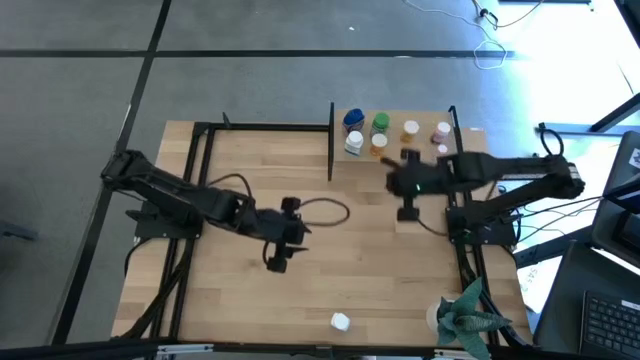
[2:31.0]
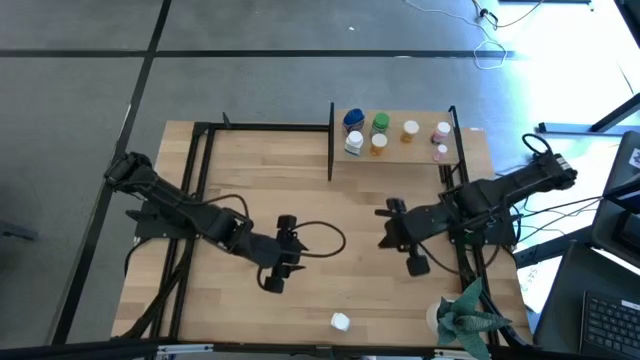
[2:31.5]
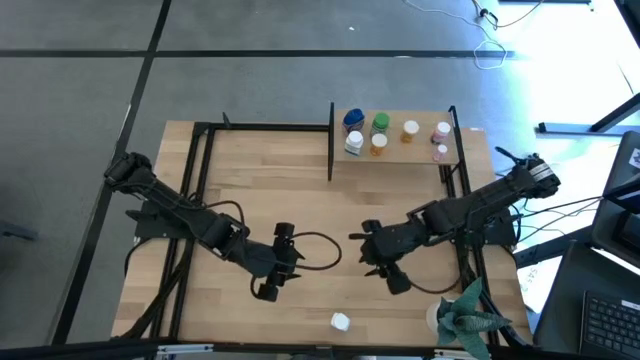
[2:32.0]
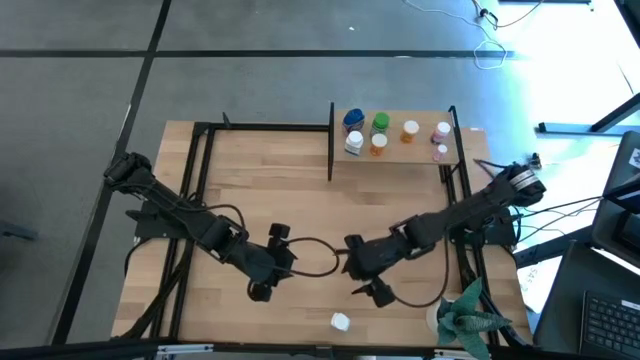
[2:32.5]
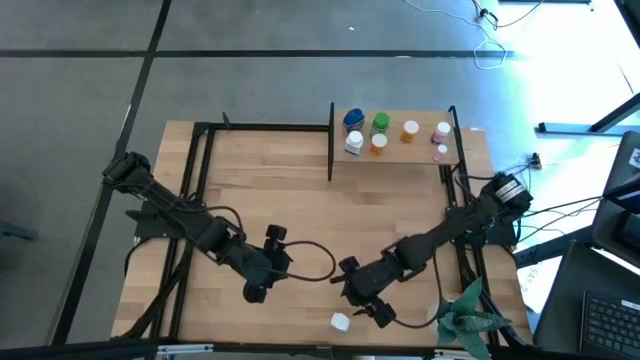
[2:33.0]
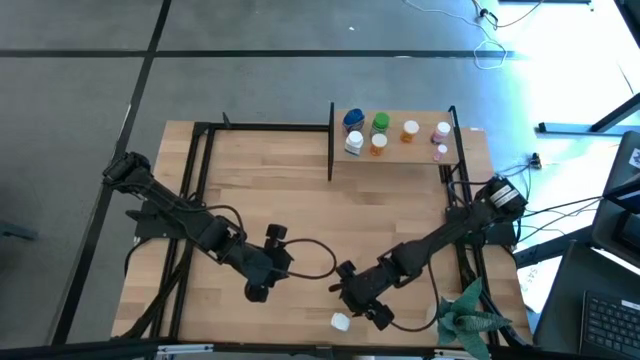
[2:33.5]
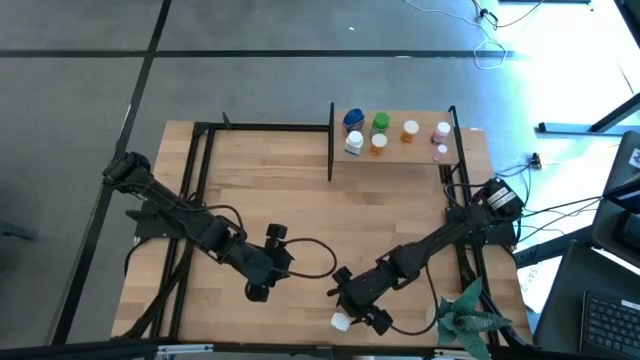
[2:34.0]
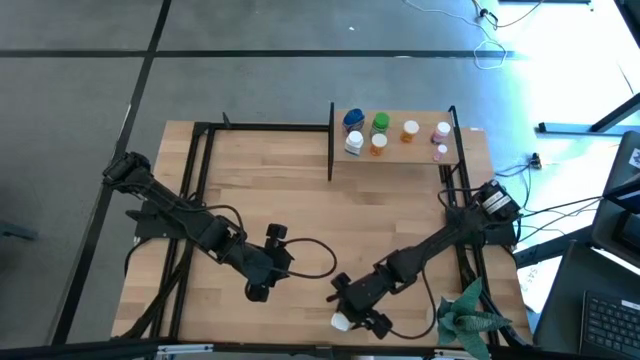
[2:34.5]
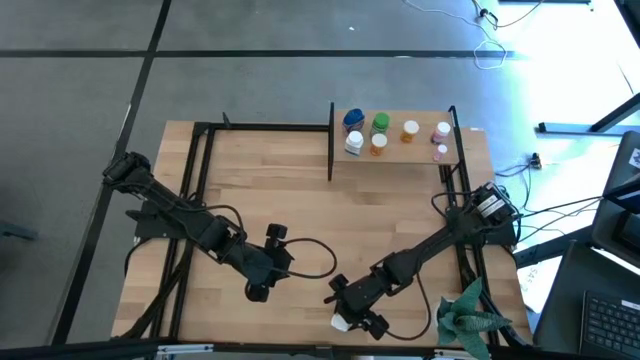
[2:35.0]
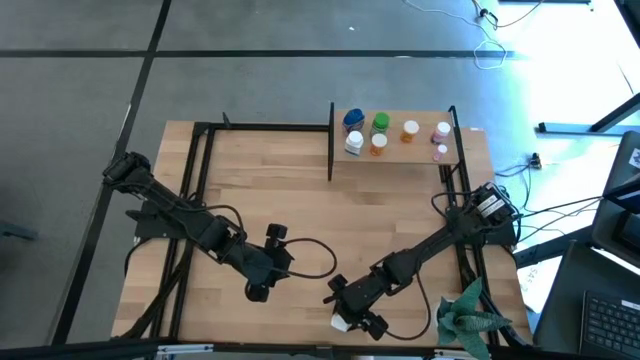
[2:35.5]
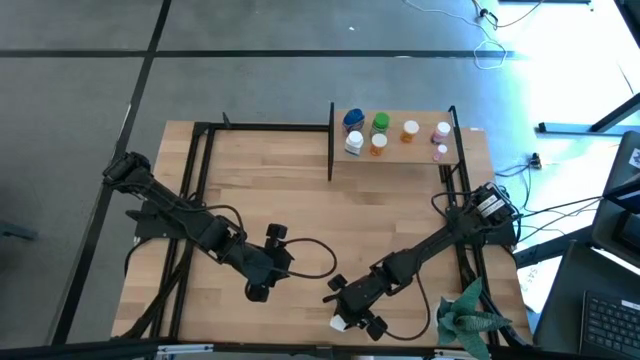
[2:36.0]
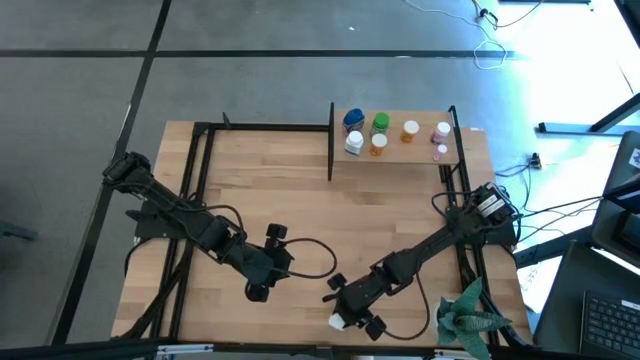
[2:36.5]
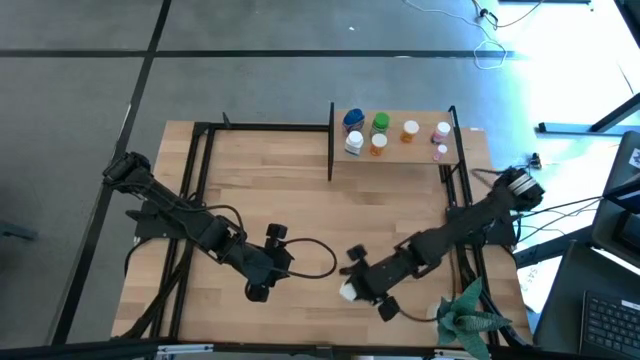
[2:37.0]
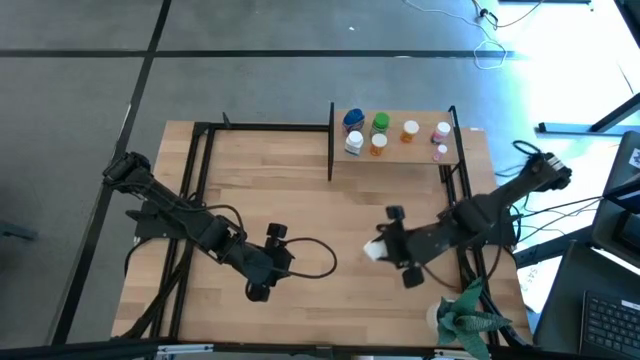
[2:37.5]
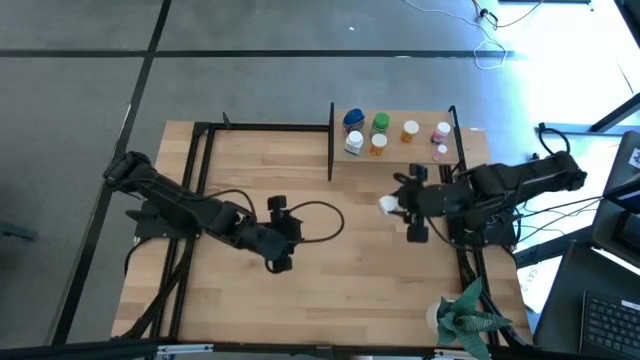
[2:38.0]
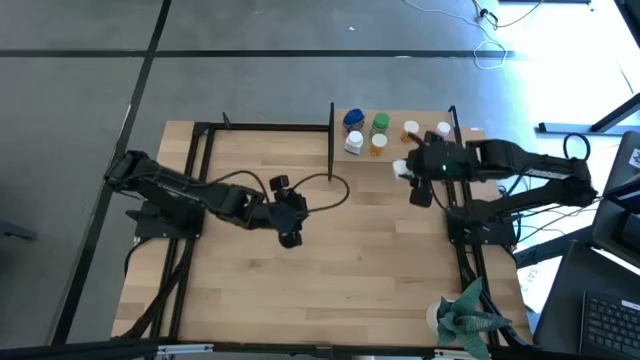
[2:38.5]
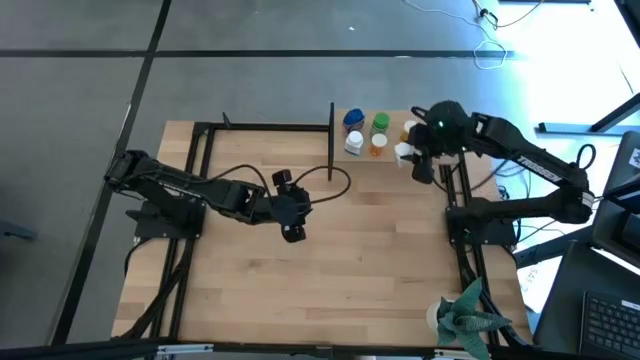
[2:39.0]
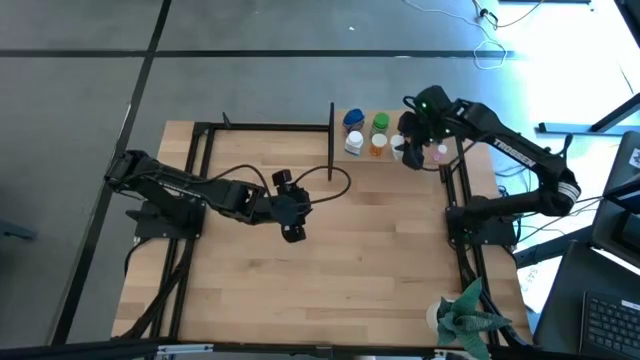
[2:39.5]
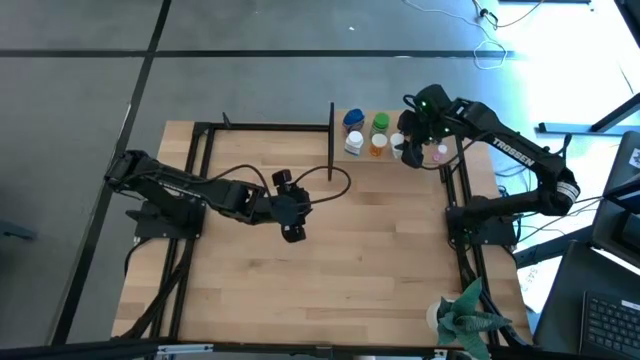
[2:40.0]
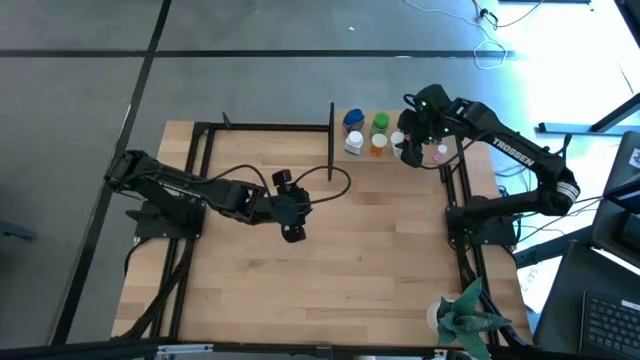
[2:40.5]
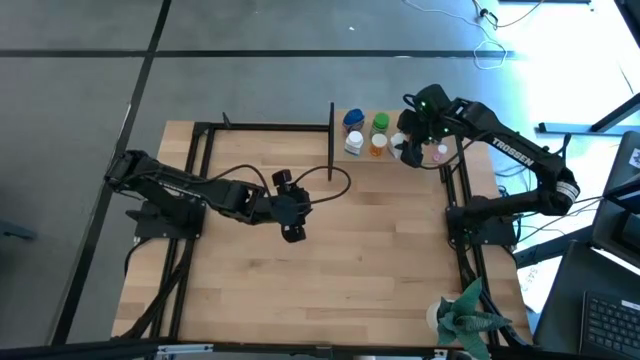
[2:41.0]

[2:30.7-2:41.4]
Task: Pick and place medicine bottles onto shelf by color
Put the white medicine bottle on the shelf

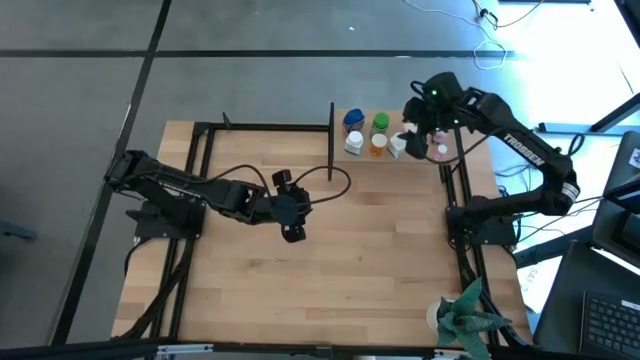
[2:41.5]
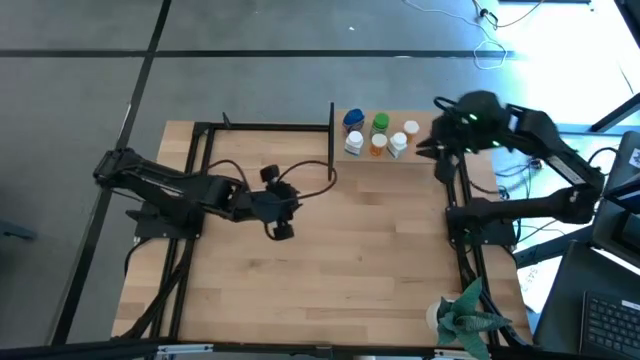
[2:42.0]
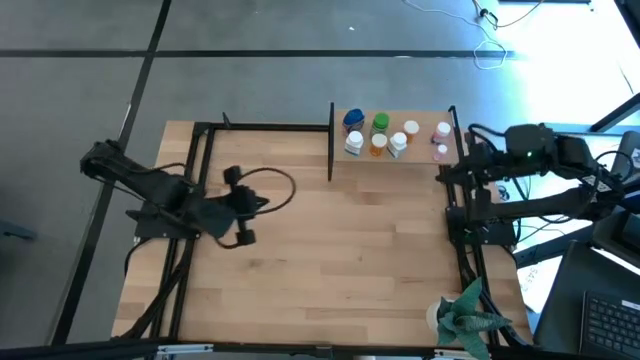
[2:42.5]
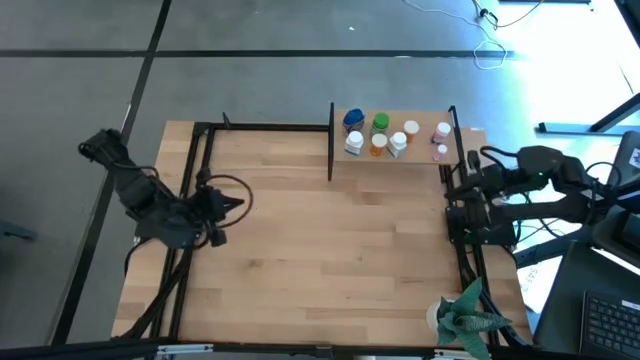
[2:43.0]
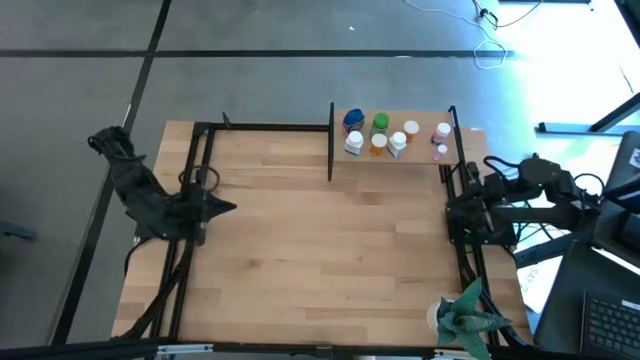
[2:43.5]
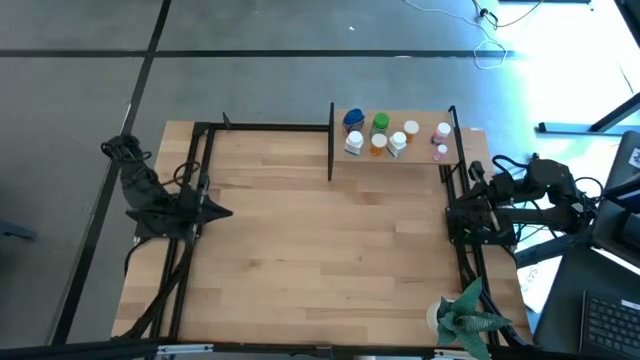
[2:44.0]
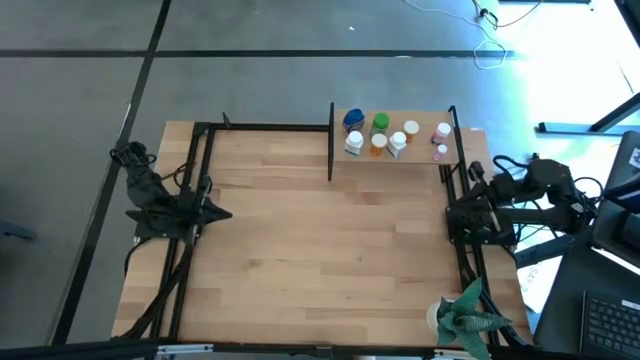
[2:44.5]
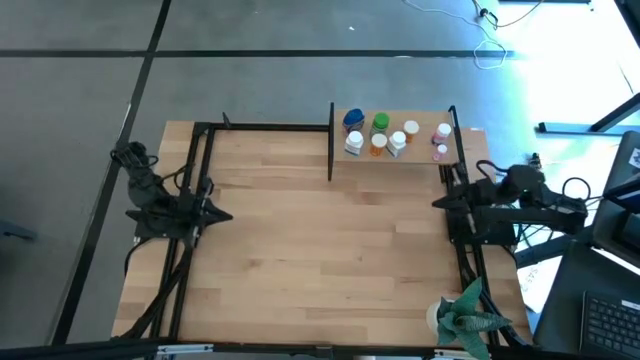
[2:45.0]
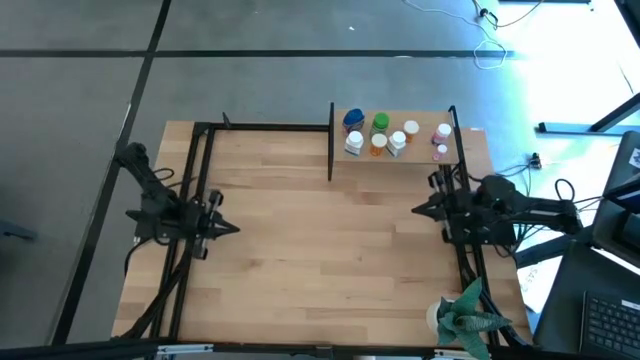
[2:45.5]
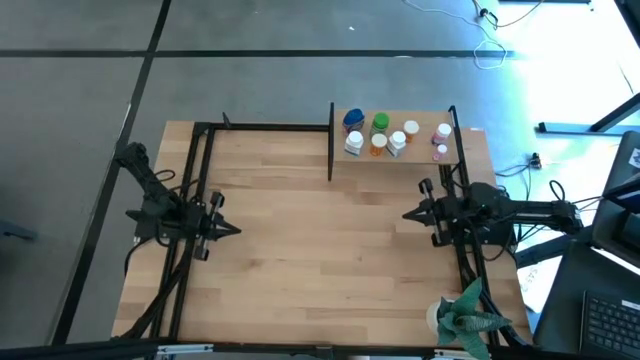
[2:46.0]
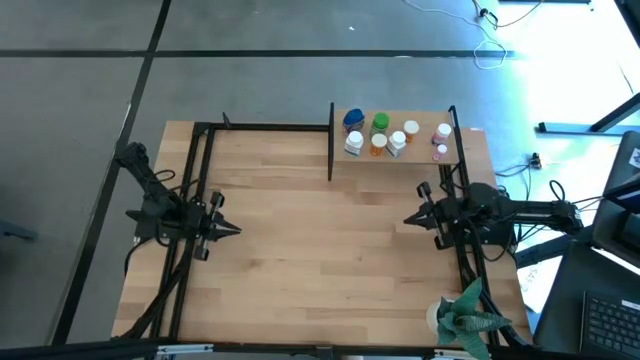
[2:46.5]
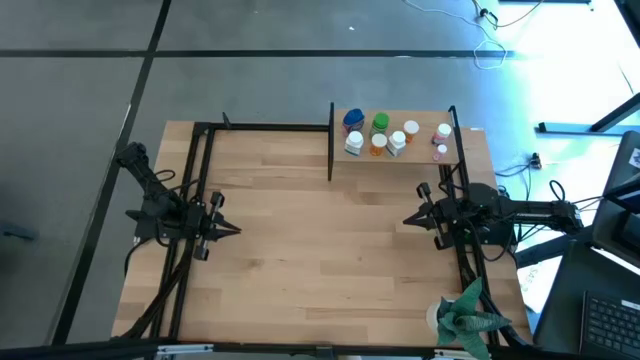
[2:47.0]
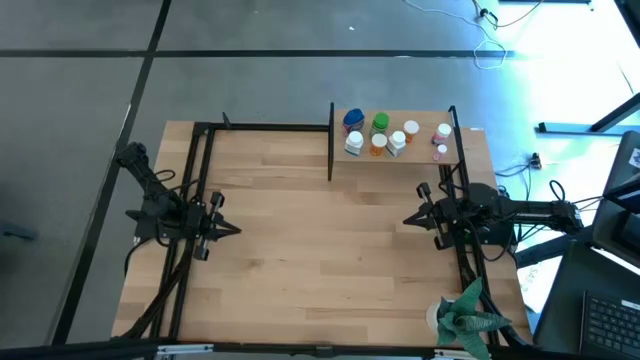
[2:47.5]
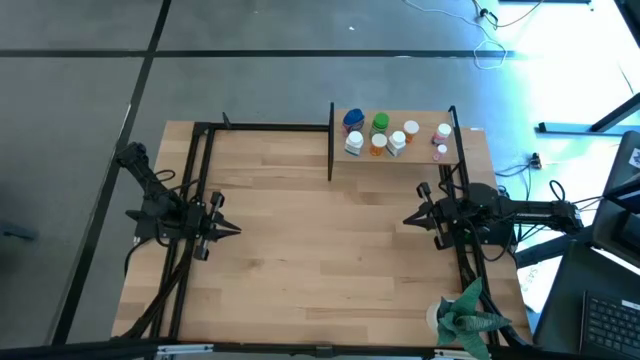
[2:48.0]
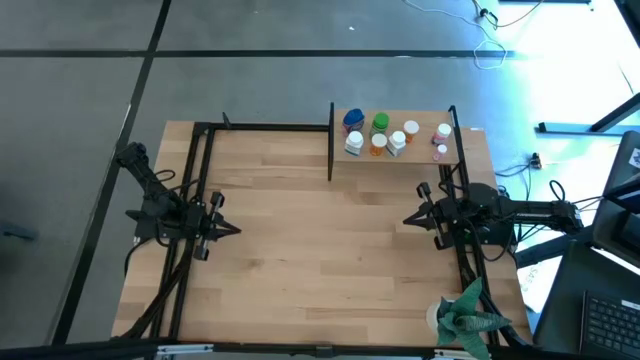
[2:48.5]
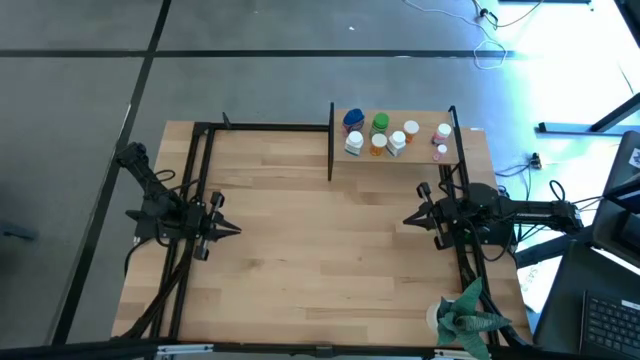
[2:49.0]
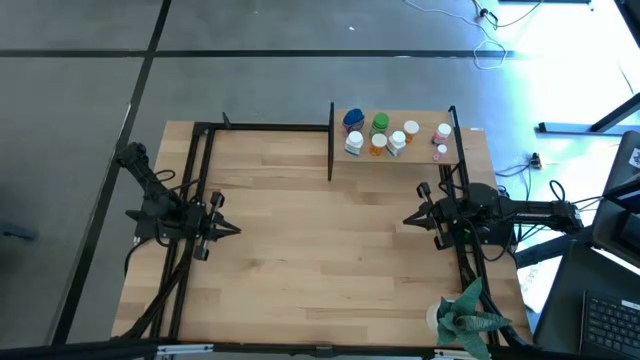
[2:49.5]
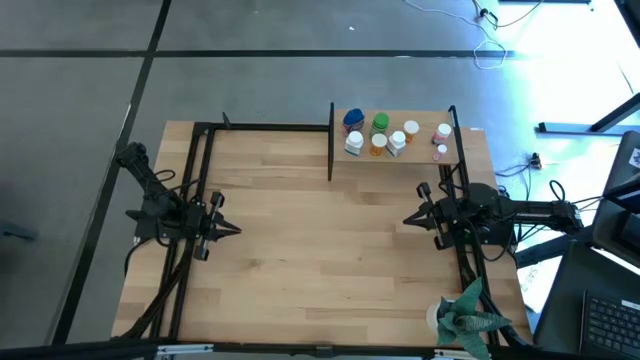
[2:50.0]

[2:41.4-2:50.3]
Return to Home Position

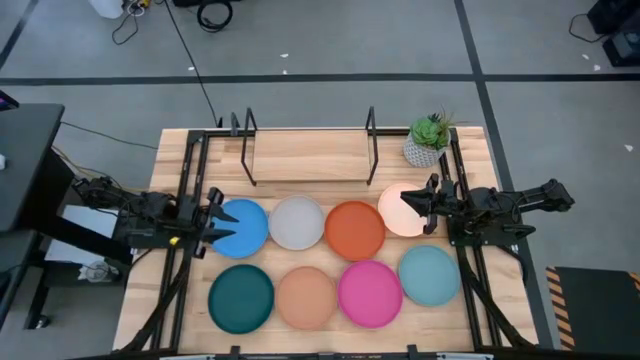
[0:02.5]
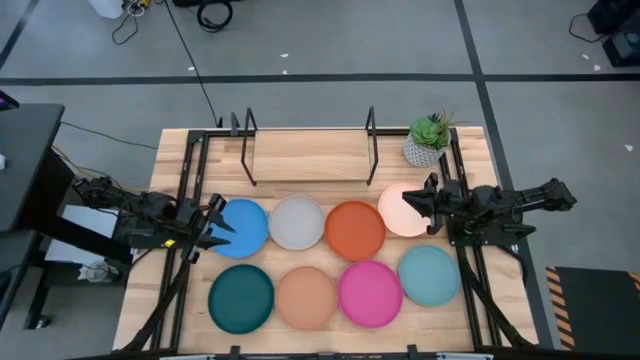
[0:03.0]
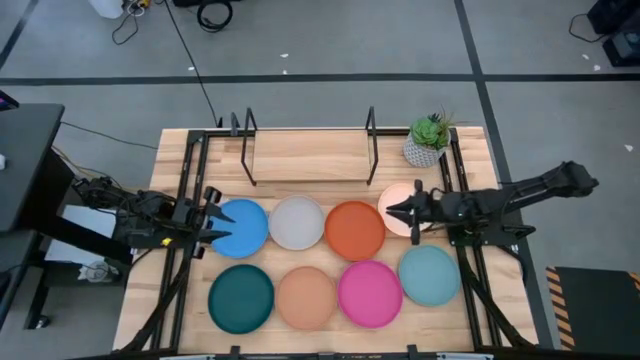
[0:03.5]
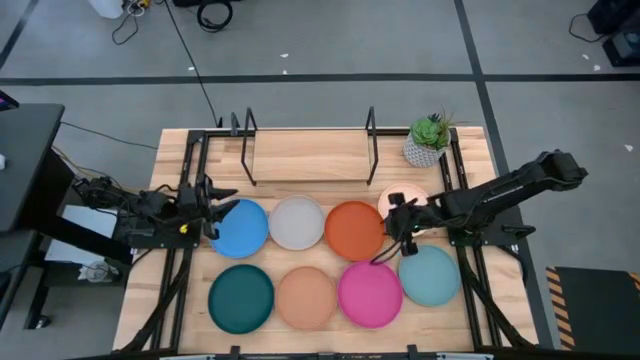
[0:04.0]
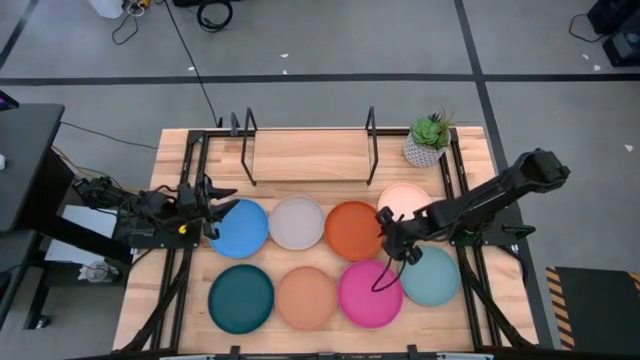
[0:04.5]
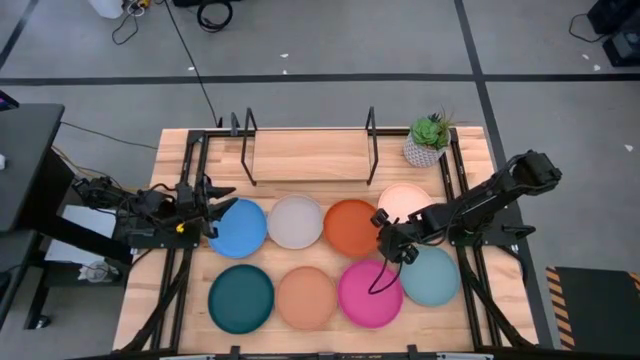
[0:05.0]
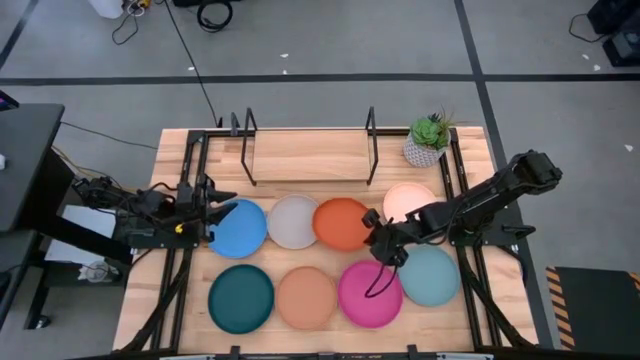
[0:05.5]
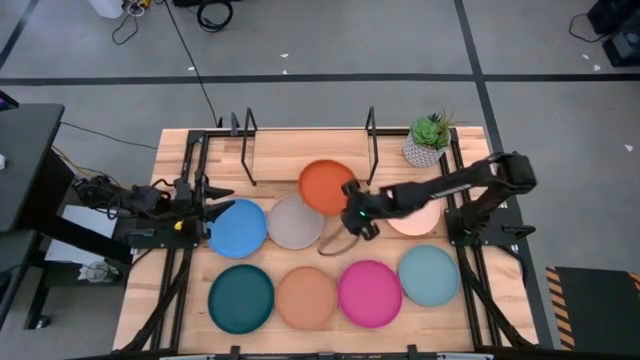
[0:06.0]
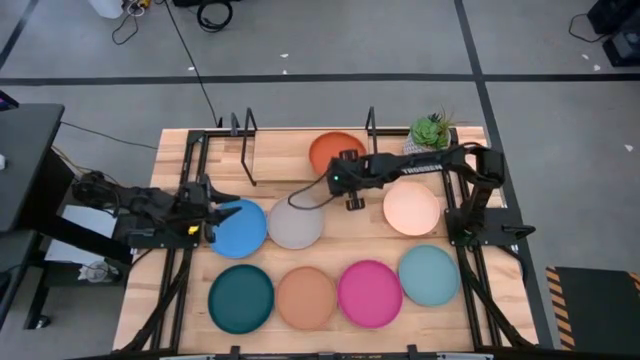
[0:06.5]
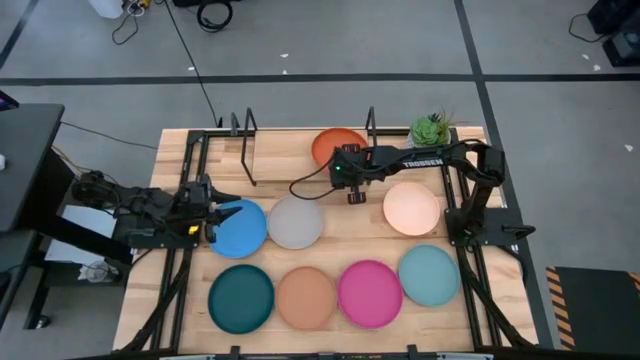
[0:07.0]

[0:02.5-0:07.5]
Task: Place and stack plates onto a shelf
Put the orange plate on the shelf
